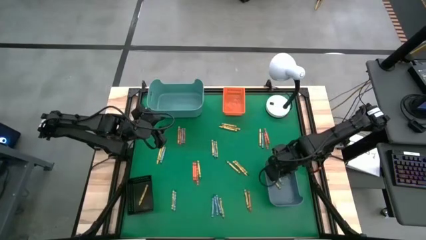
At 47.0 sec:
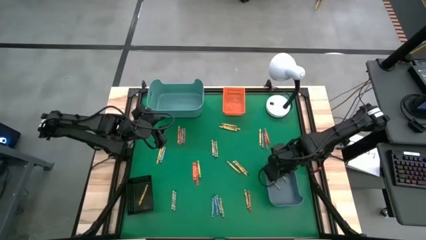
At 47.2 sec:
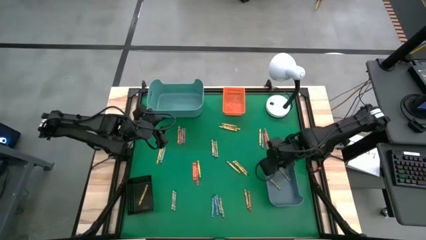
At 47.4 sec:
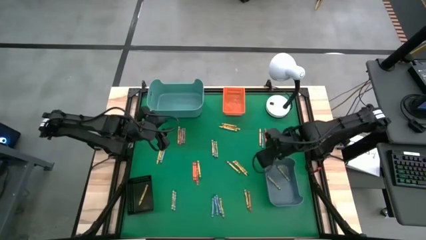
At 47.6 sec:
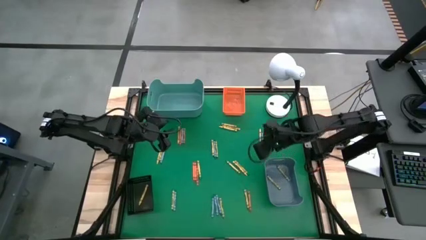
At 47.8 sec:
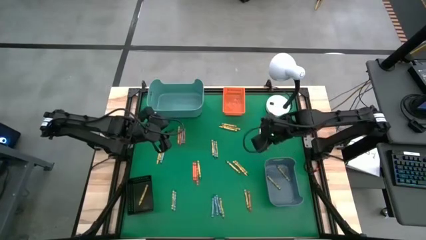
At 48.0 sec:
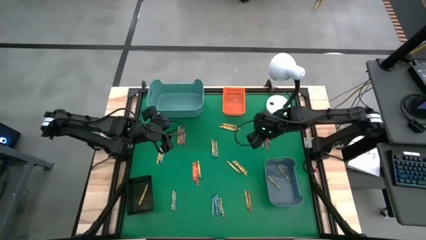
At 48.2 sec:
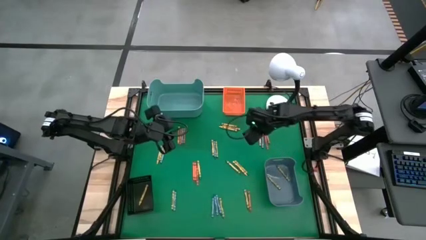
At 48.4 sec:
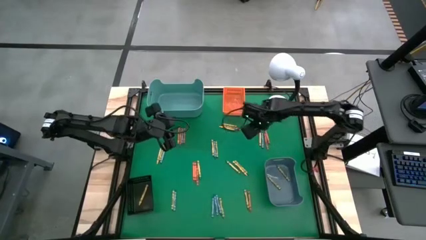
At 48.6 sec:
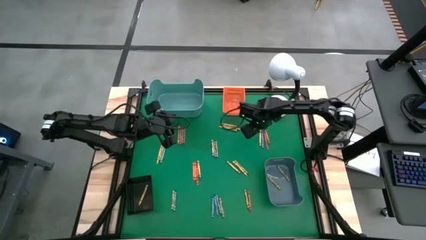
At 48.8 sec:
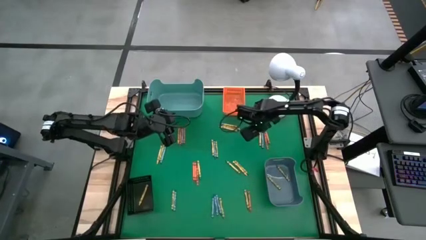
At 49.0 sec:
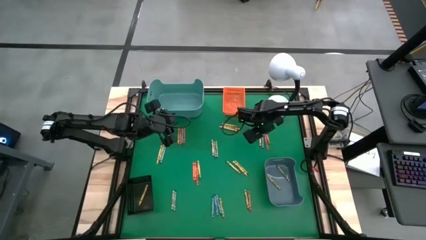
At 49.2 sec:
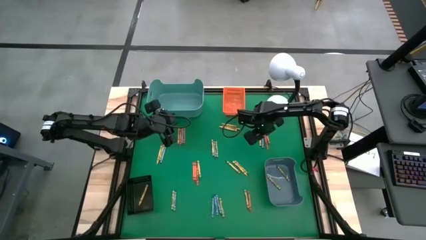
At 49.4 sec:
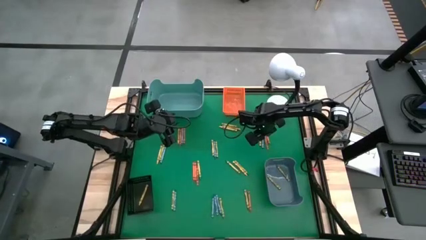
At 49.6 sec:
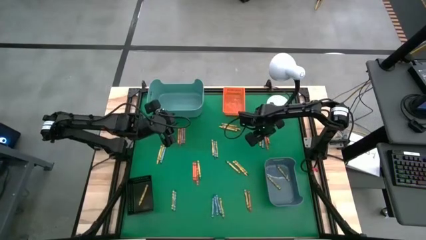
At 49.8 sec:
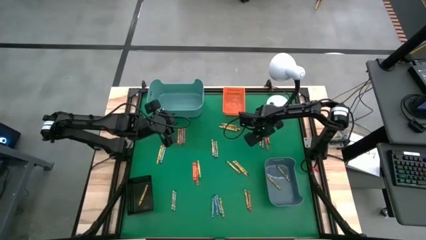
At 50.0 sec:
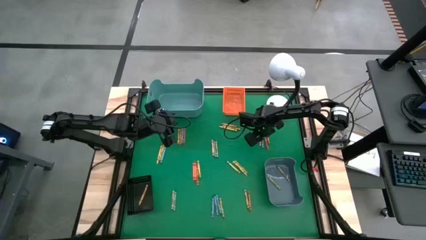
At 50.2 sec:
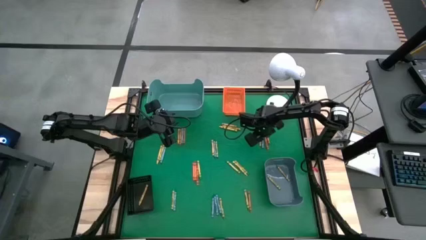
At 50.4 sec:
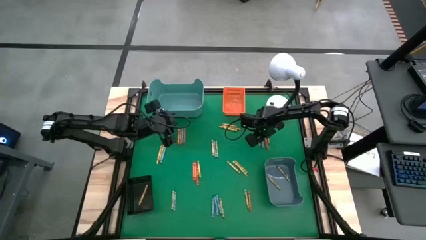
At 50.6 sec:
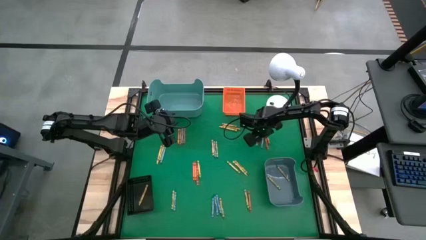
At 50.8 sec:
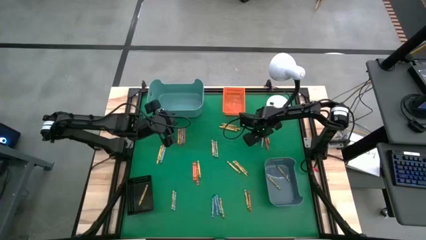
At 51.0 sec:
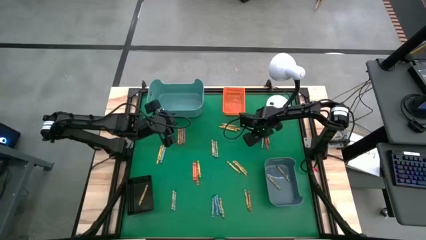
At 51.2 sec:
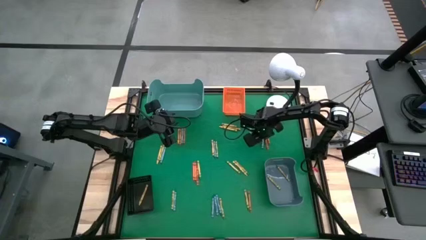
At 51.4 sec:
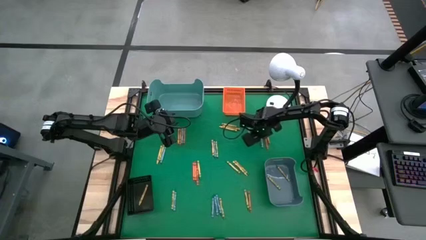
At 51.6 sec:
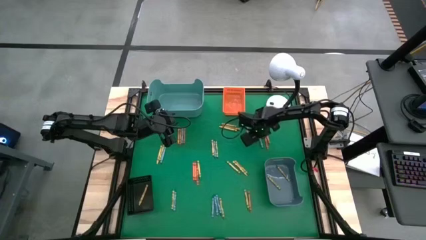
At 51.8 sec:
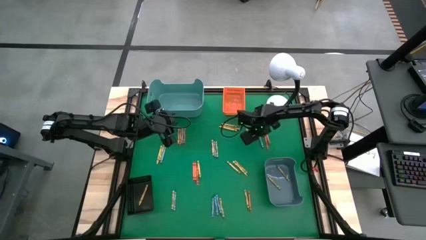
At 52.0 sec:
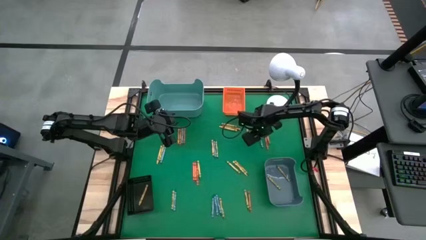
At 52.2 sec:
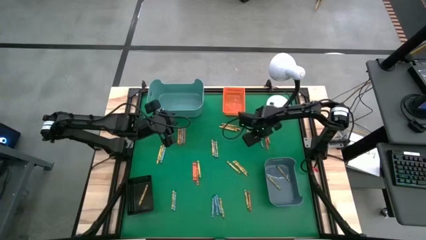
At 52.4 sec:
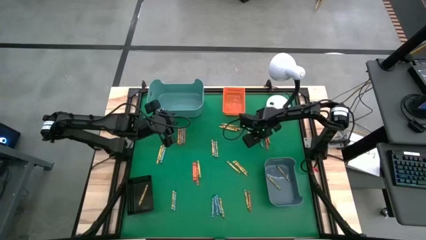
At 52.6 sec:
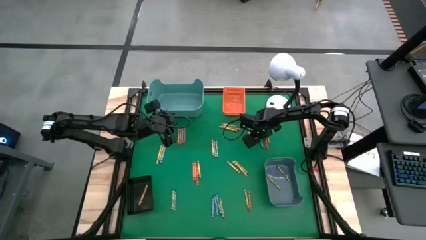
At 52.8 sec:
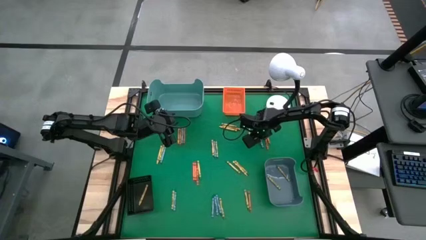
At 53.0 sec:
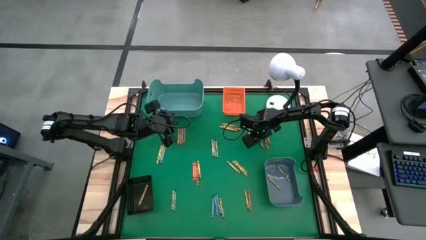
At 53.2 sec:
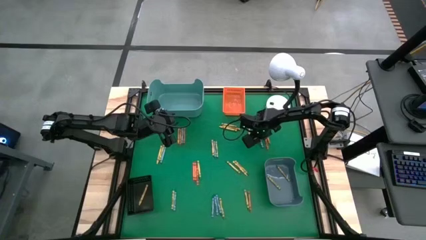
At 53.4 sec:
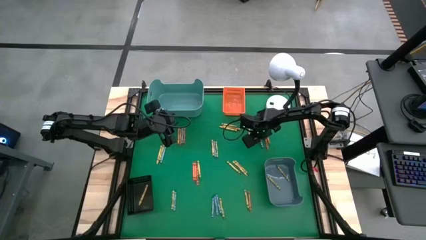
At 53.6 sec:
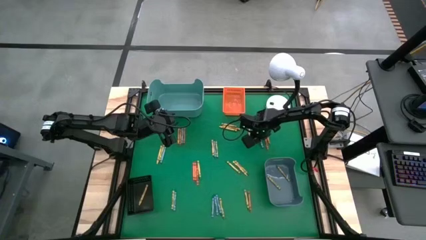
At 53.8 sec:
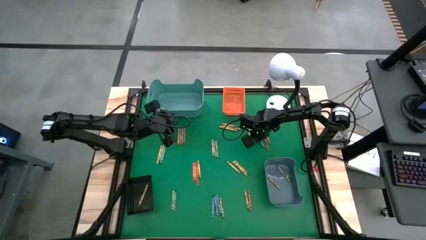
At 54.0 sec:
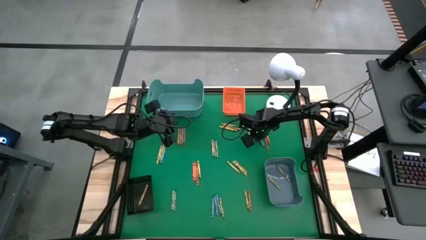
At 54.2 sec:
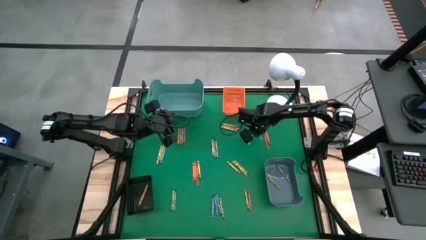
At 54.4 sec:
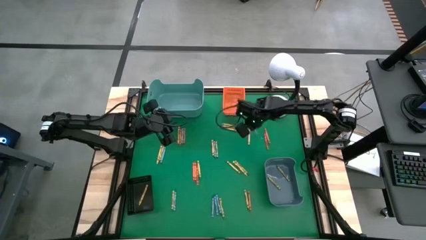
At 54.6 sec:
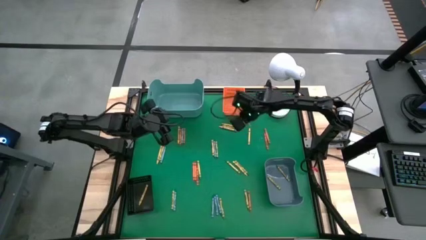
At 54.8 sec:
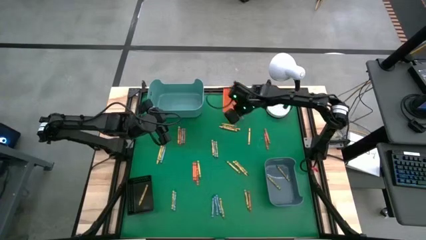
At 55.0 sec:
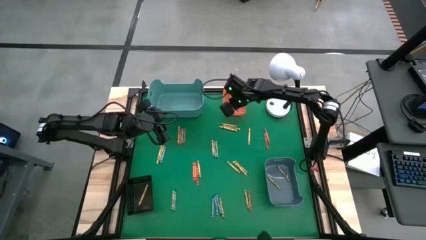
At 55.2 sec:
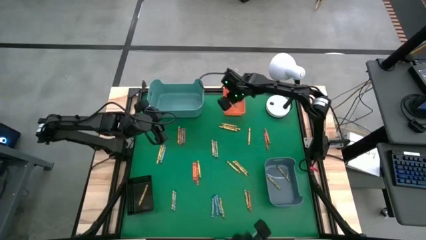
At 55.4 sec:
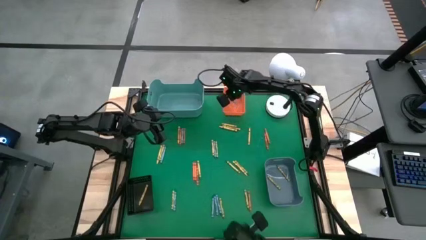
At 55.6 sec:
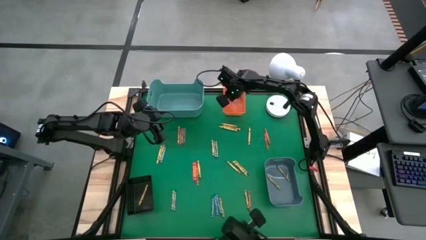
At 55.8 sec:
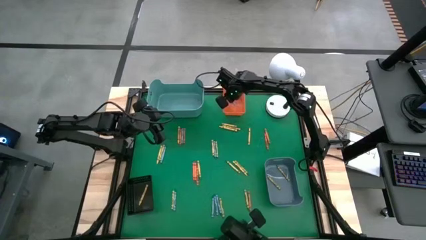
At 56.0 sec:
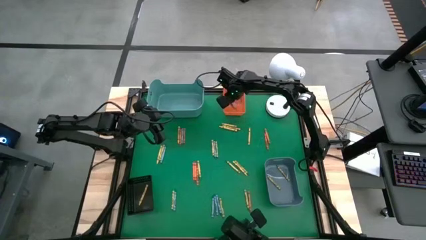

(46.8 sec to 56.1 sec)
Task: Sort crayons
Put the blue crayon into the orange bin

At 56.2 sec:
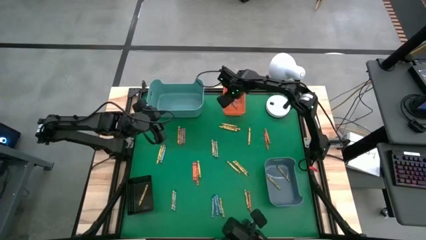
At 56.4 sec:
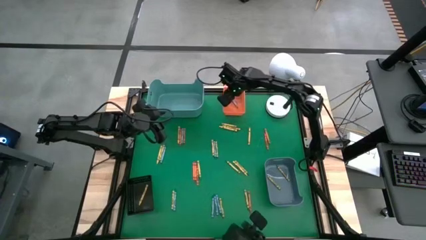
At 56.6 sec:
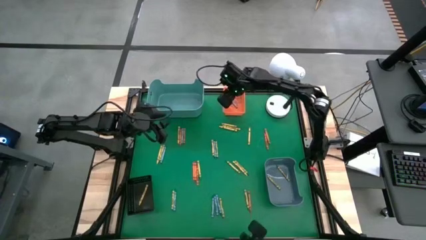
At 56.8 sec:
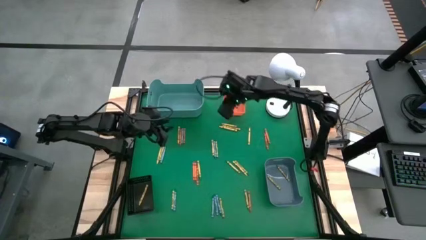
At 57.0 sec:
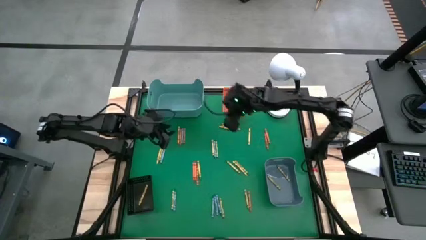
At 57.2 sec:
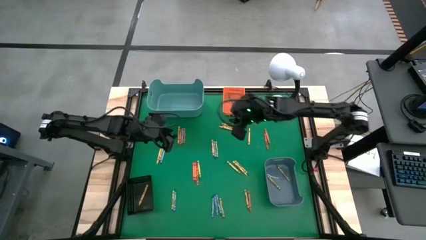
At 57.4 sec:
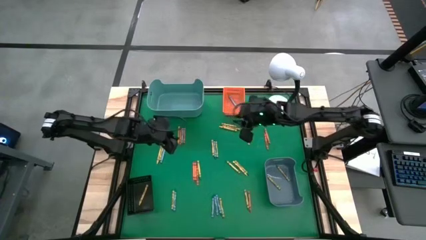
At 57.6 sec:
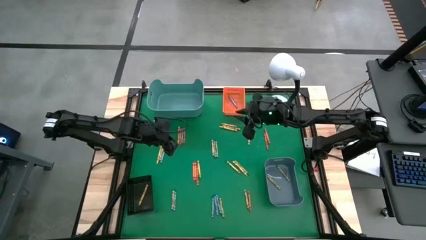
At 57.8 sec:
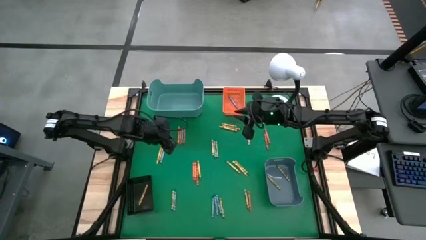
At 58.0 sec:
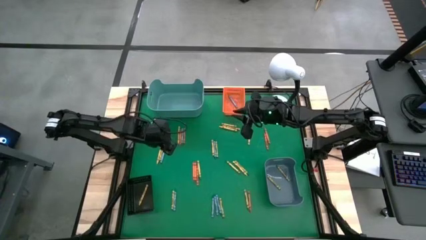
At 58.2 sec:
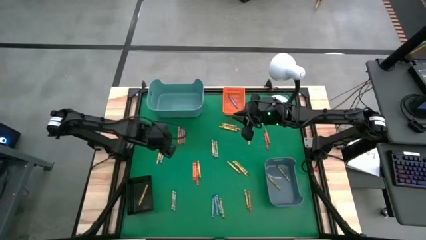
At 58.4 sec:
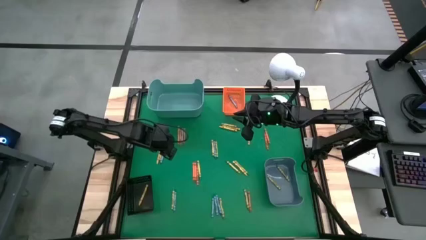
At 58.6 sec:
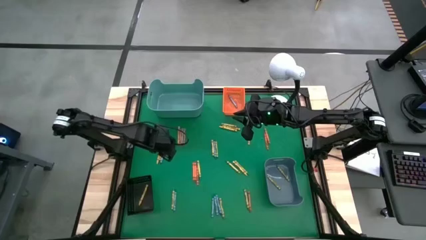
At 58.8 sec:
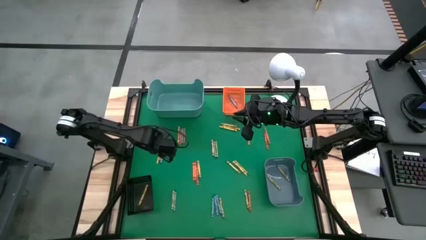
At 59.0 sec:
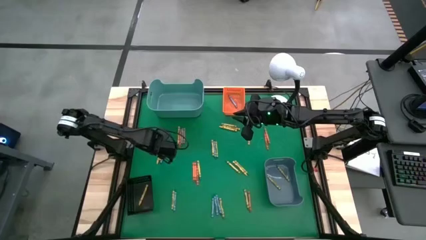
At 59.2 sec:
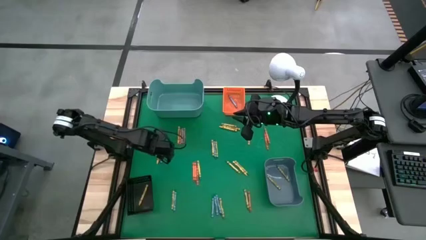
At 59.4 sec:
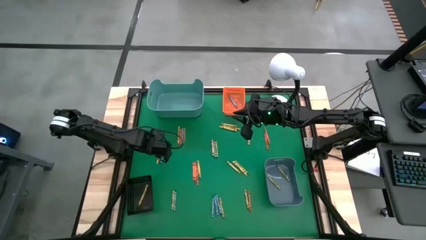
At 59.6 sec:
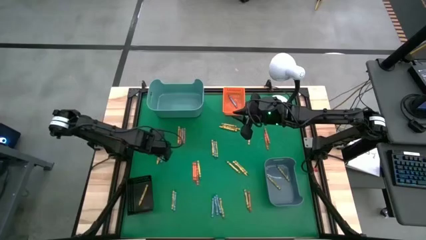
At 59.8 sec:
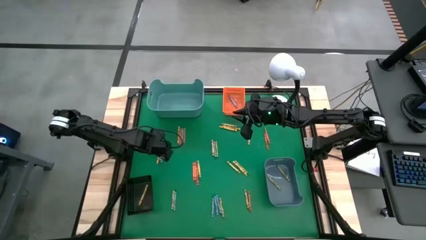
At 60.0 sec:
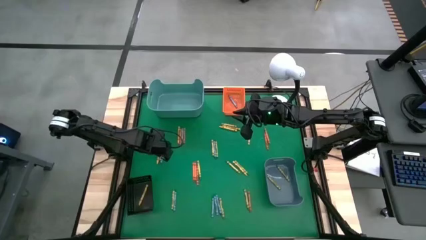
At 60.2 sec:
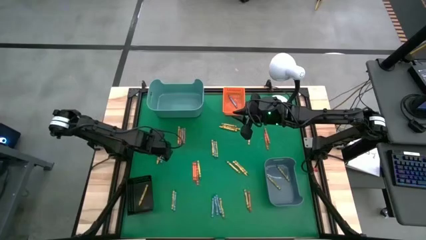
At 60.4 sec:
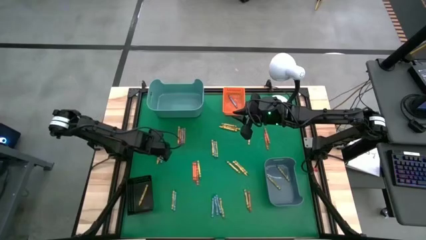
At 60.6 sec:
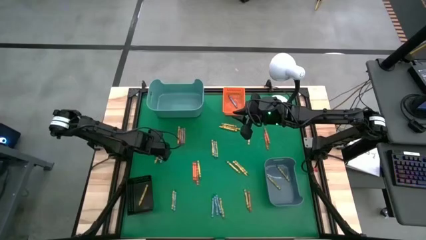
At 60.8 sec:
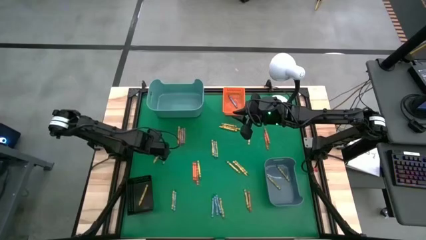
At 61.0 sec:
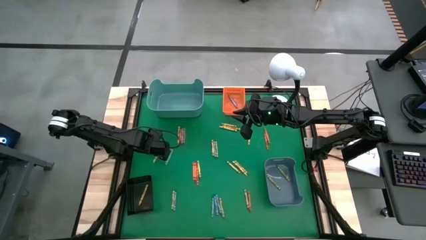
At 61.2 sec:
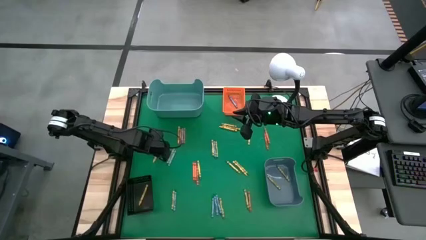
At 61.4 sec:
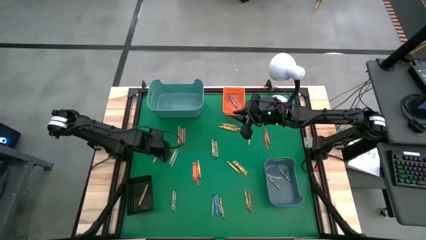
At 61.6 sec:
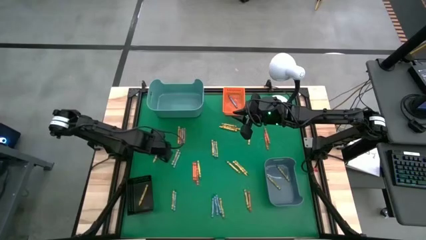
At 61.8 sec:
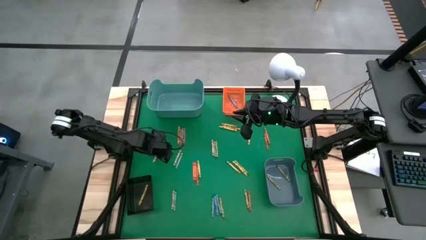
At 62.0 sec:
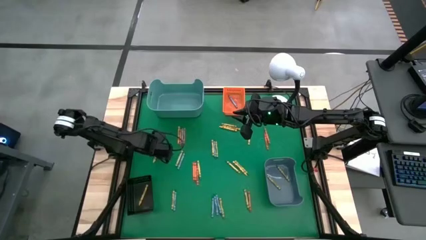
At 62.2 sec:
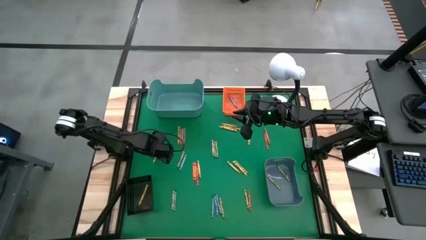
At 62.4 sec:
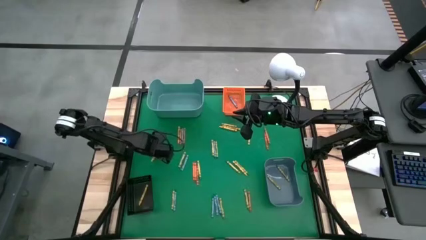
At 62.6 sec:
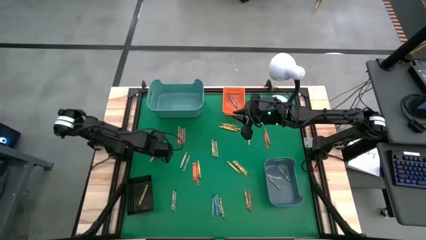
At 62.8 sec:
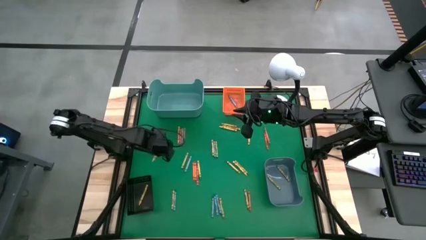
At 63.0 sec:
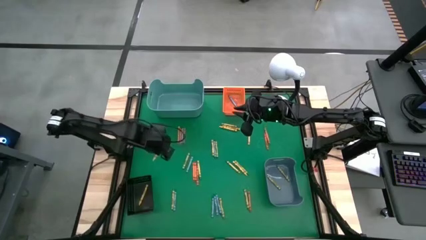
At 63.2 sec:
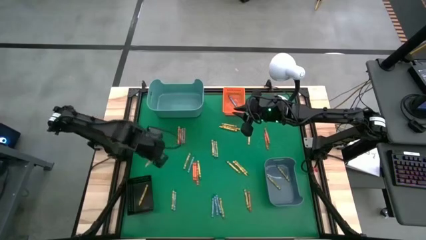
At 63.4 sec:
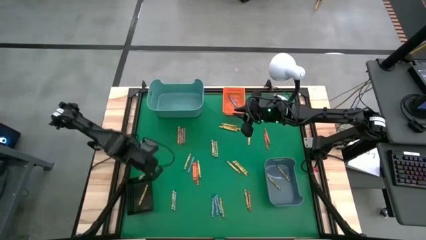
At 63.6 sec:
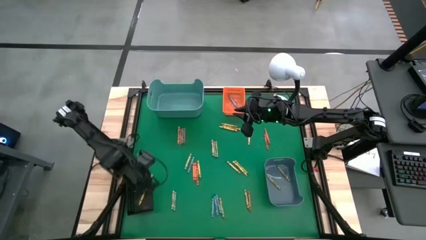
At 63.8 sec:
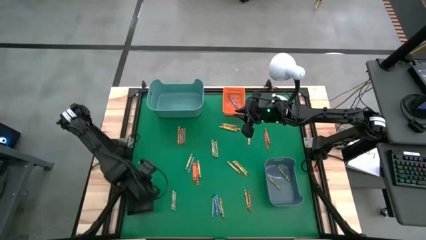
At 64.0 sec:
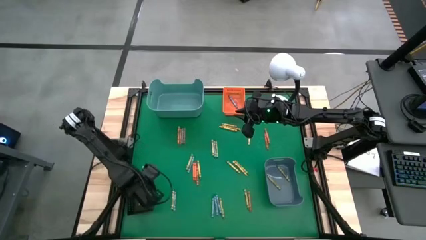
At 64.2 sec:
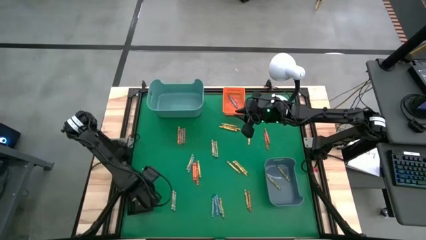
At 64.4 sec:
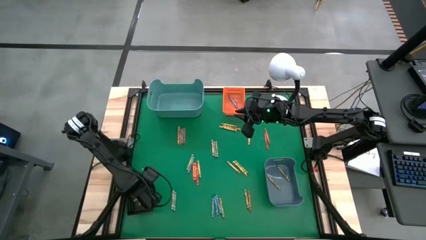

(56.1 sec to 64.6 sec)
Put the yellow crayon into the black bin
